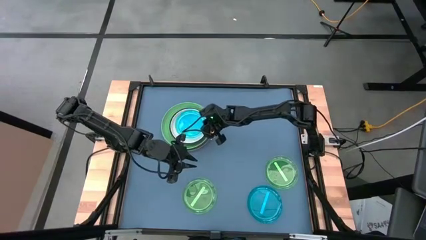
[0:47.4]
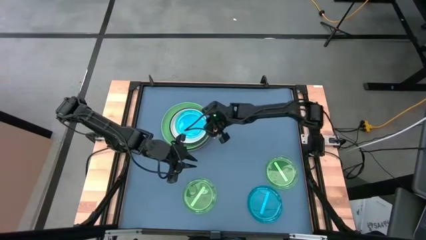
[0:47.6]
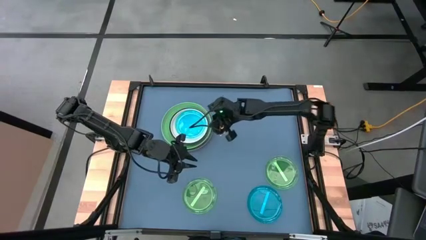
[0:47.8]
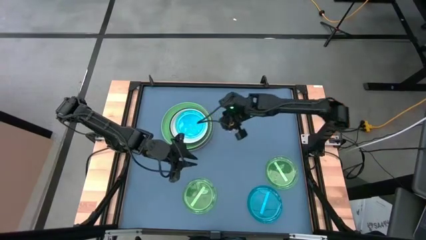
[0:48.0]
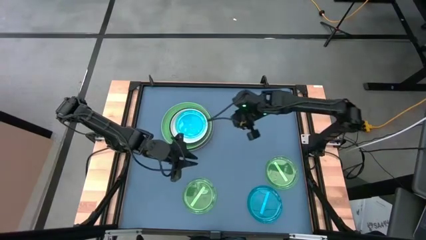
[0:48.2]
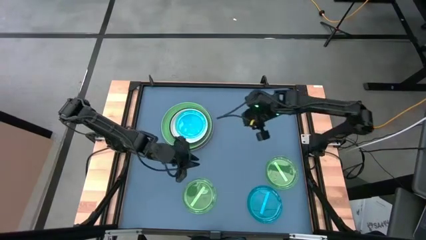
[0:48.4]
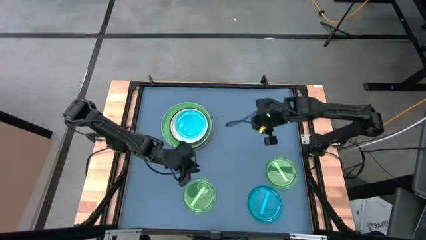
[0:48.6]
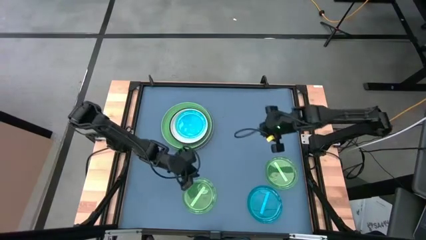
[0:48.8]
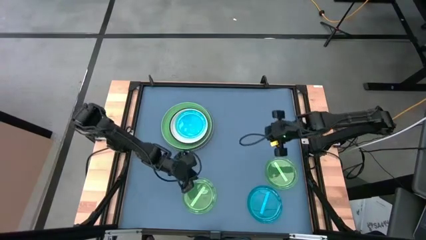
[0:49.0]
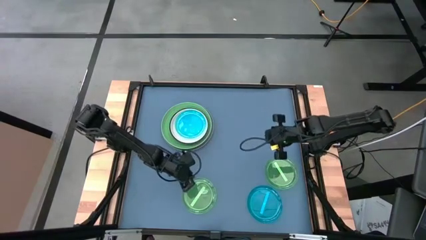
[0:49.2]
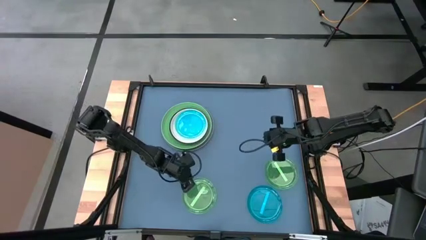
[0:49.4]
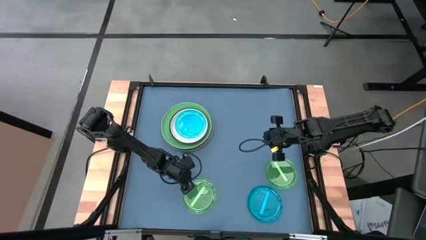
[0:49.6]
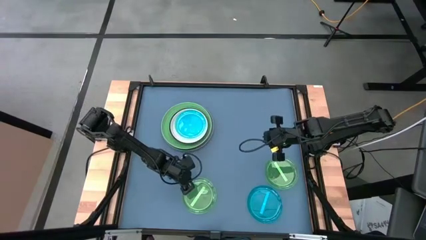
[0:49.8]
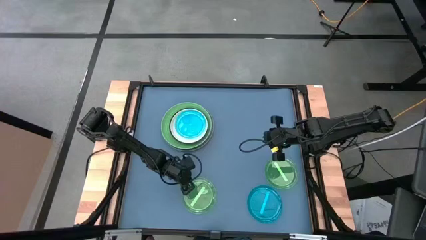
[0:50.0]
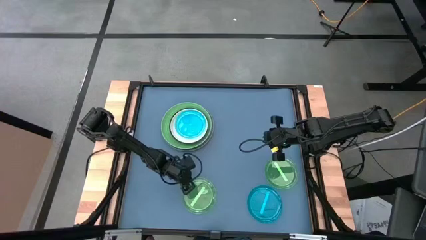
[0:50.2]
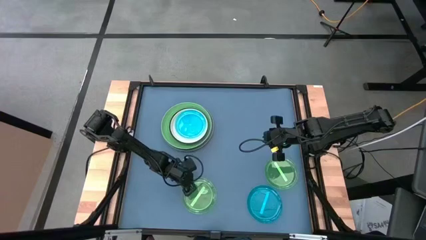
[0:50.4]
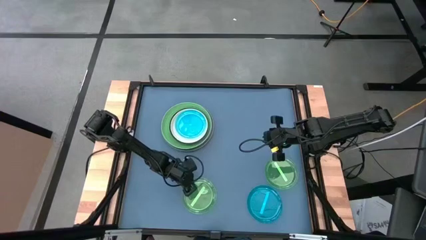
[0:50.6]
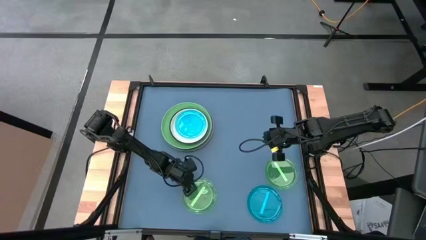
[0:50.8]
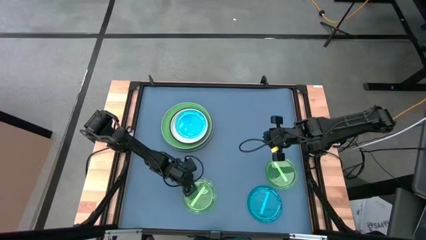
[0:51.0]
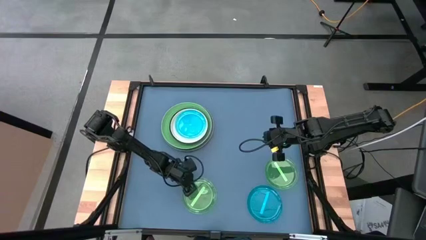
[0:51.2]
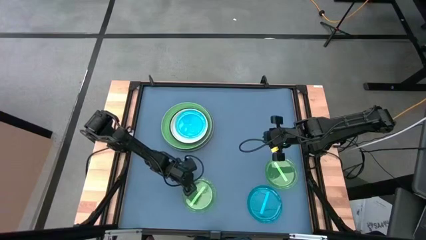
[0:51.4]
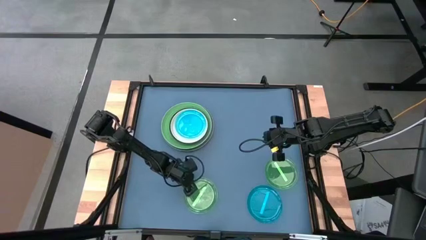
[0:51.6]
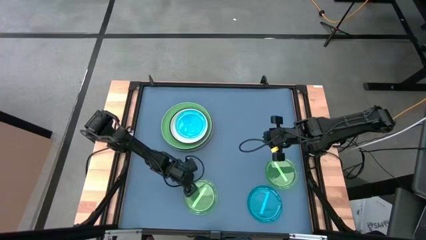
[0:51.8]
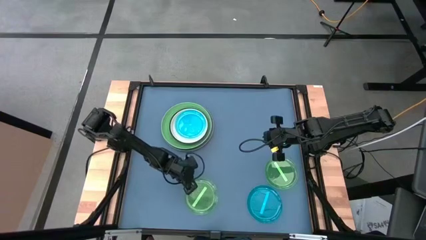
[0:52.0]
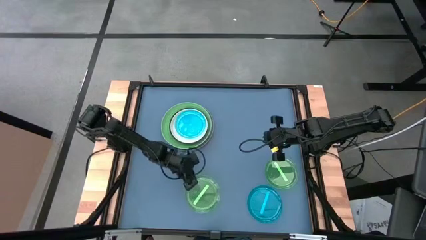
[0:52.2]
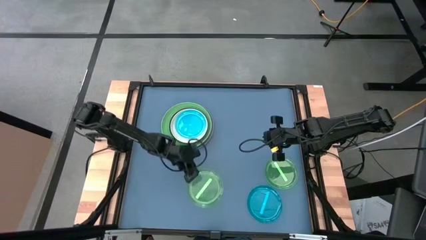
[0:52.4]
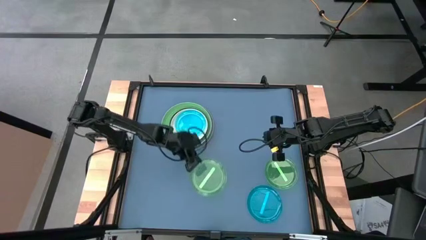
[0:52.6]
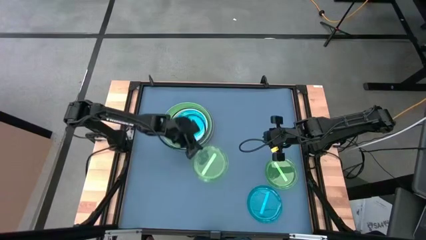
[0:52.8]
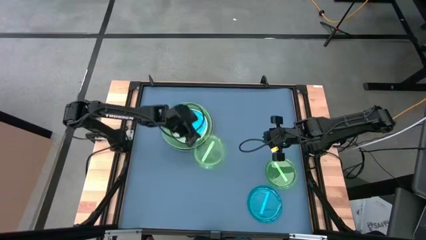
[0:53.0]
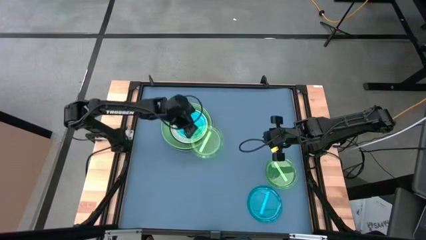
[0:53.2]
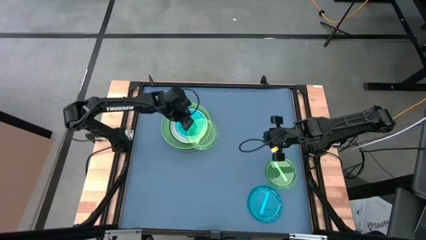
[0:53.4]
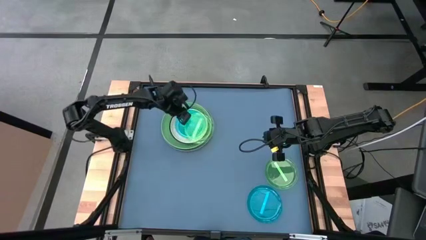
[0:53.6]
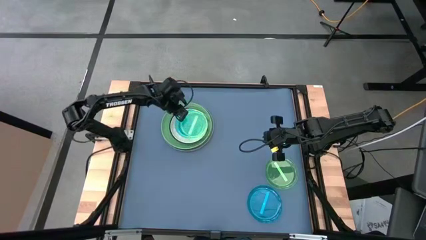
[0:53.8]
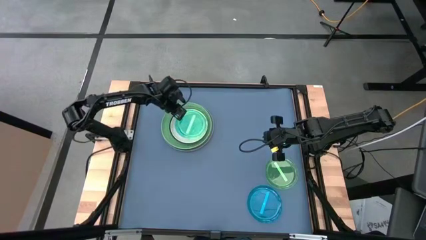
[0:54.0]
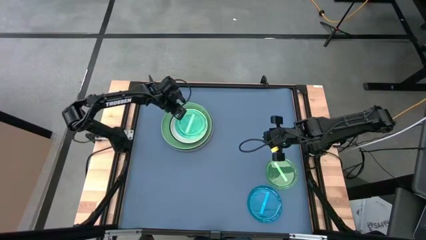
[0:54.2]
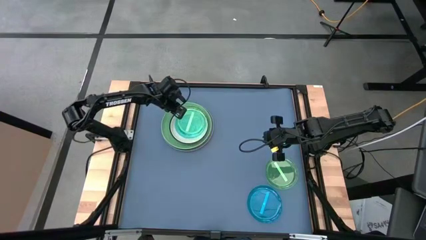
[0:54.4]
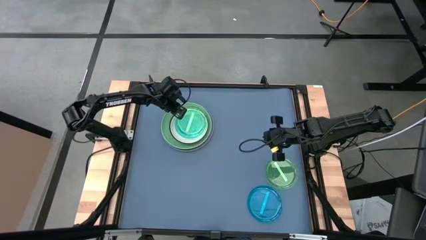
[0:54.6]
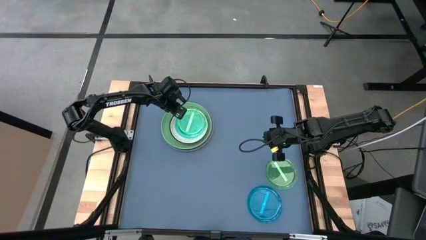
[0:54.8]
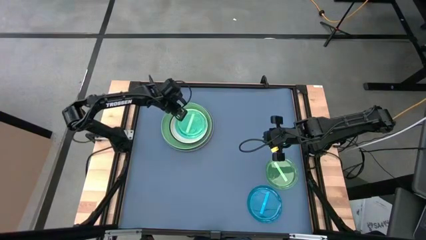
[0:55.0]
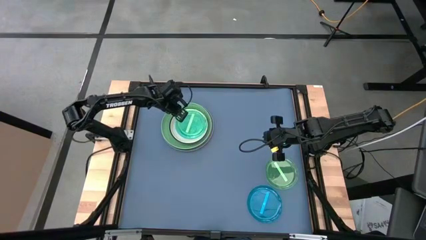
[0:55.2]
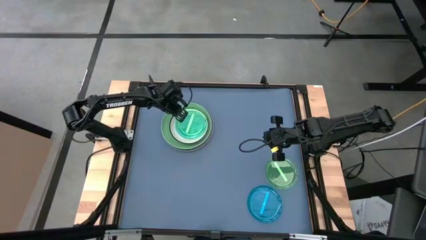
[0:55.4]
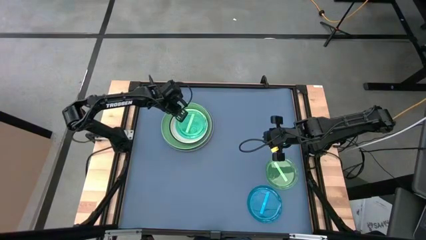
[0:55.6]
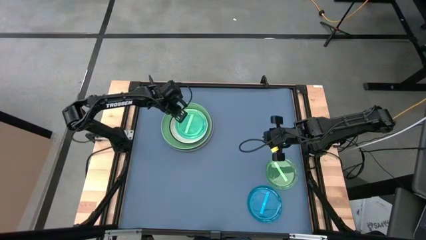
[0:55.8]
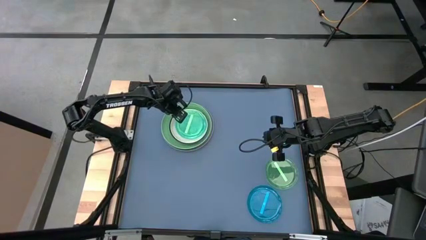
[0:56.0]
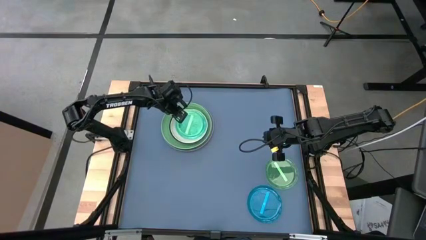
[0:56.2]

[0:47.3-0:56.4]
Task: Stack plastic plates
Stack the left light green plate on top of the blue plate

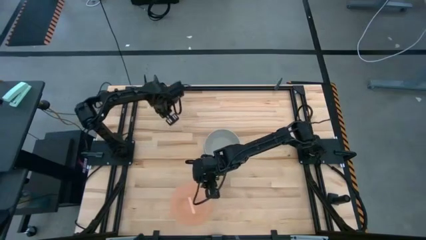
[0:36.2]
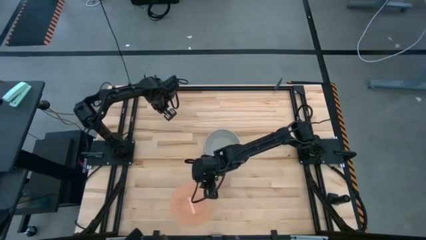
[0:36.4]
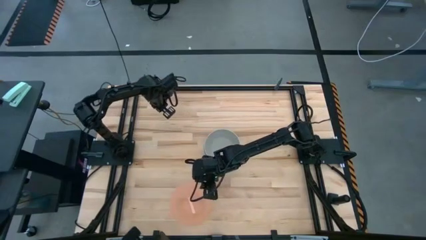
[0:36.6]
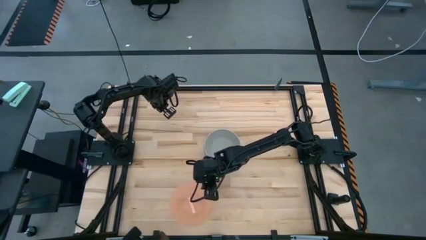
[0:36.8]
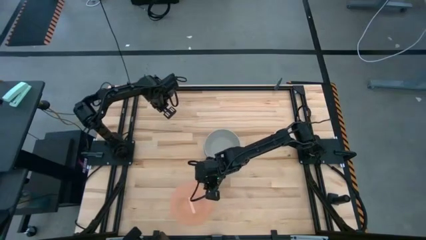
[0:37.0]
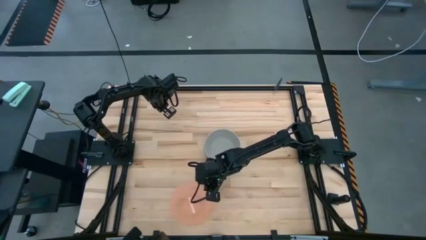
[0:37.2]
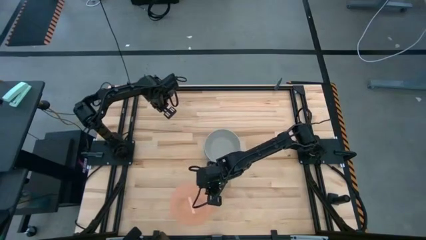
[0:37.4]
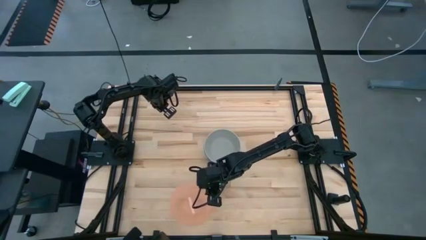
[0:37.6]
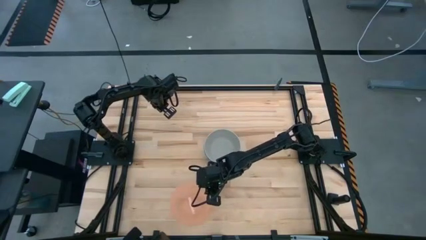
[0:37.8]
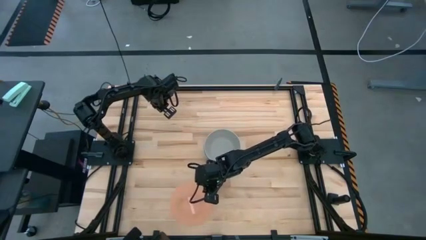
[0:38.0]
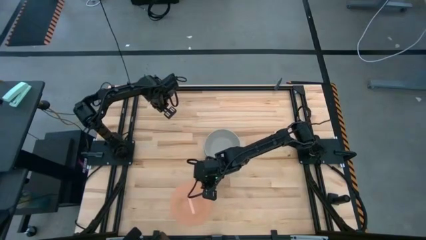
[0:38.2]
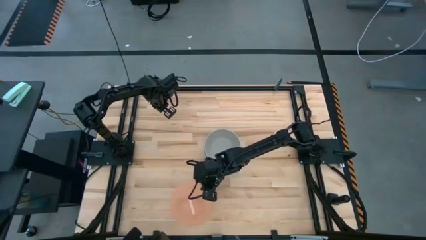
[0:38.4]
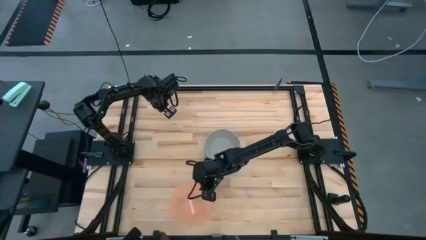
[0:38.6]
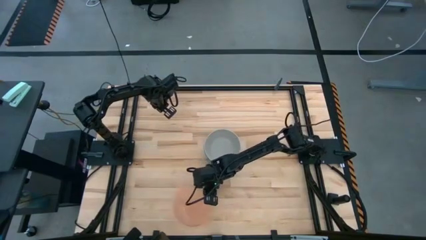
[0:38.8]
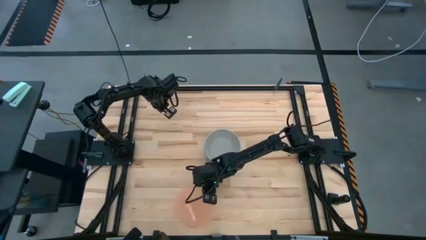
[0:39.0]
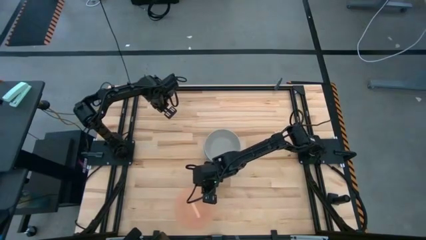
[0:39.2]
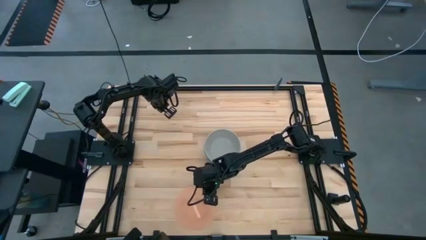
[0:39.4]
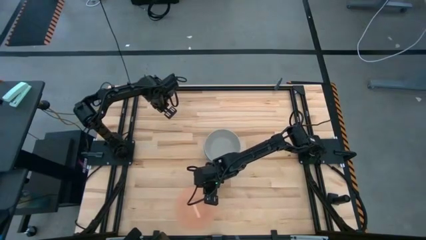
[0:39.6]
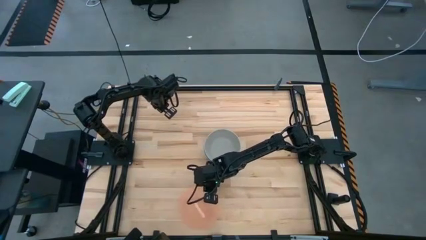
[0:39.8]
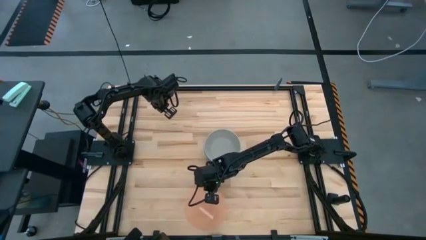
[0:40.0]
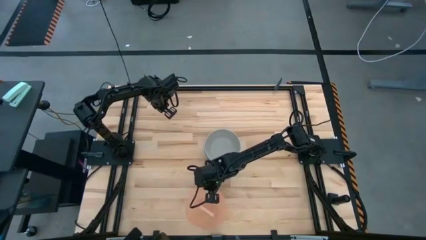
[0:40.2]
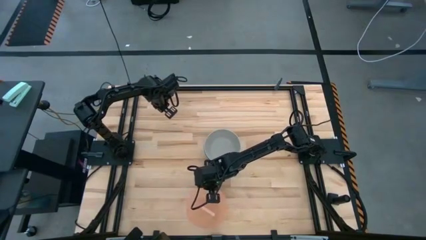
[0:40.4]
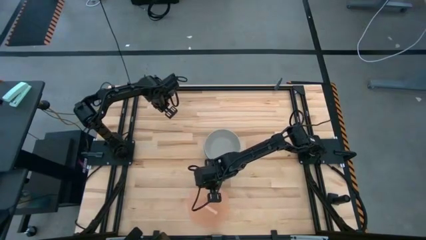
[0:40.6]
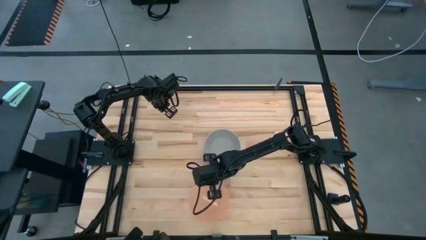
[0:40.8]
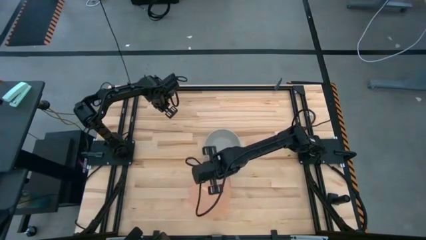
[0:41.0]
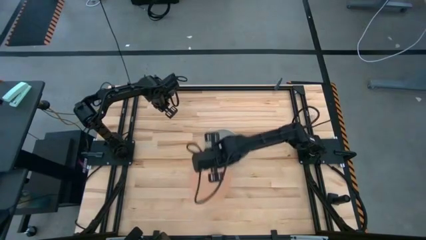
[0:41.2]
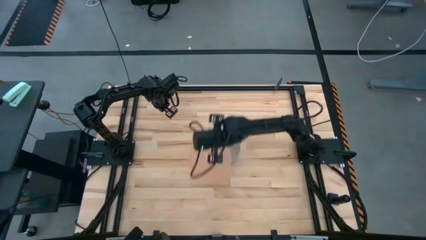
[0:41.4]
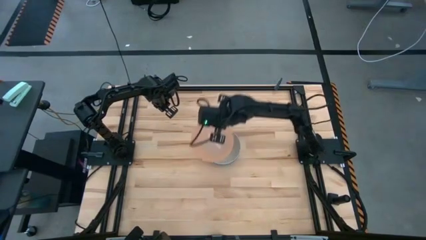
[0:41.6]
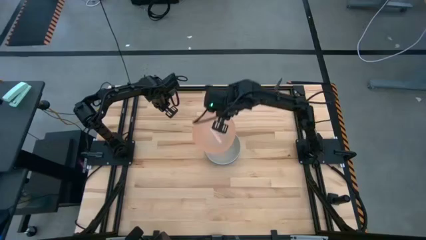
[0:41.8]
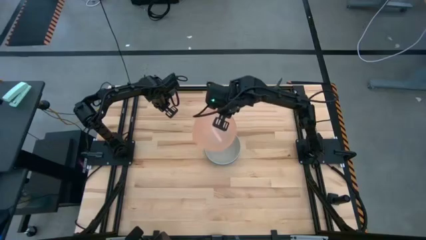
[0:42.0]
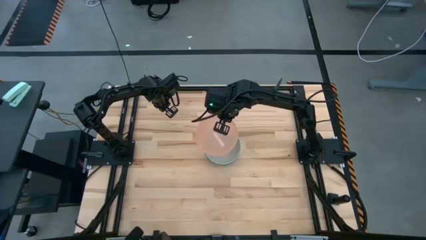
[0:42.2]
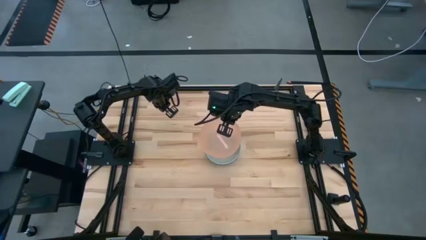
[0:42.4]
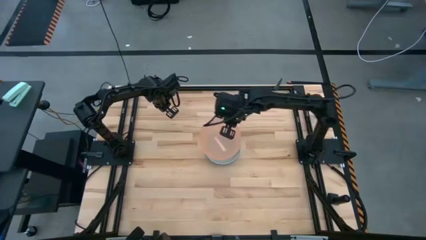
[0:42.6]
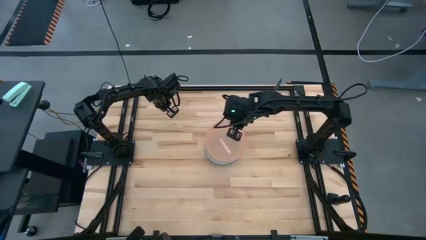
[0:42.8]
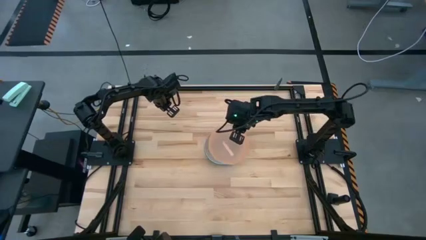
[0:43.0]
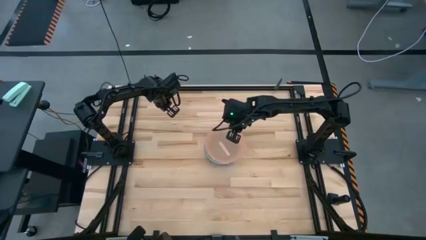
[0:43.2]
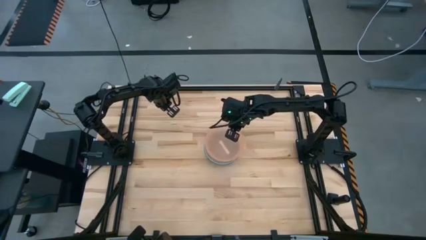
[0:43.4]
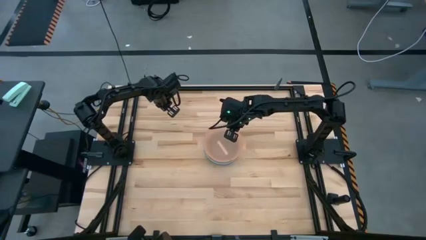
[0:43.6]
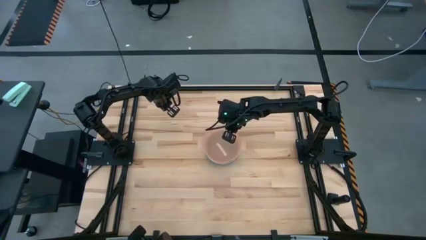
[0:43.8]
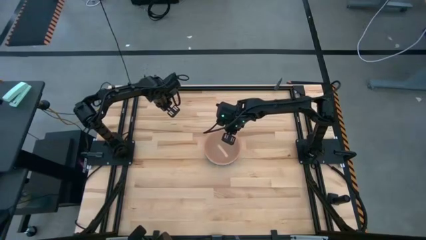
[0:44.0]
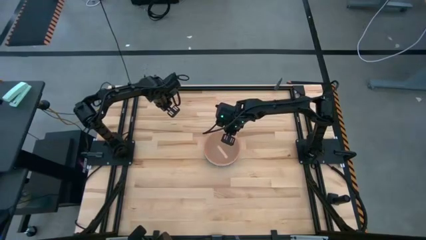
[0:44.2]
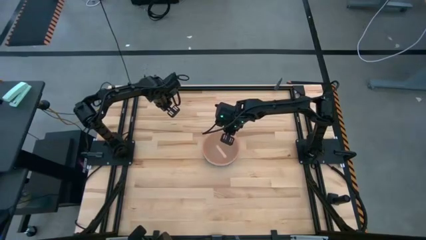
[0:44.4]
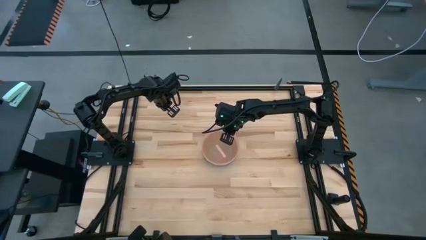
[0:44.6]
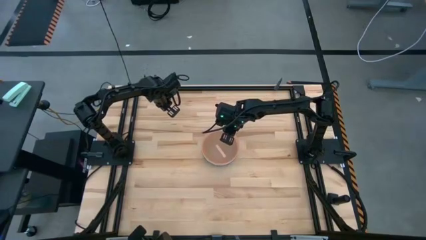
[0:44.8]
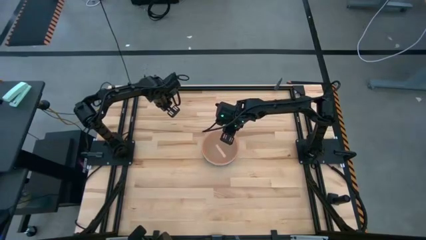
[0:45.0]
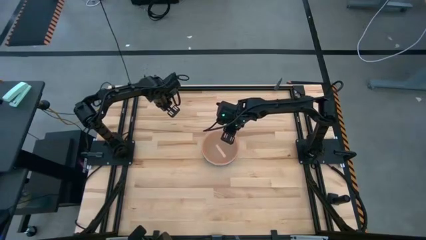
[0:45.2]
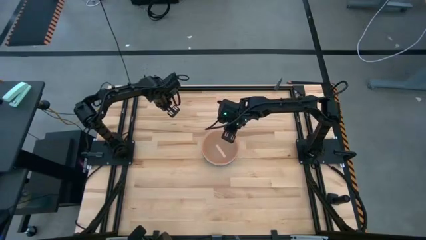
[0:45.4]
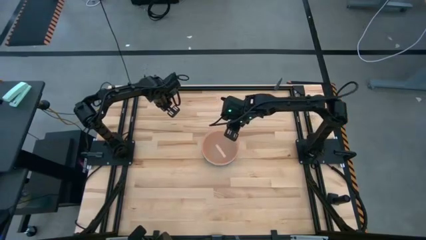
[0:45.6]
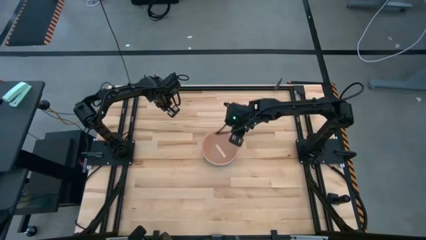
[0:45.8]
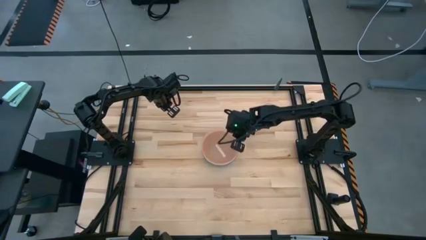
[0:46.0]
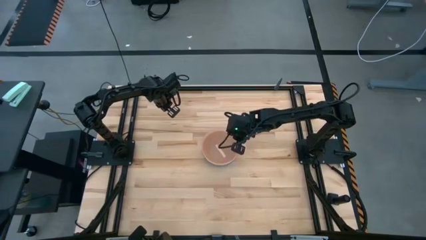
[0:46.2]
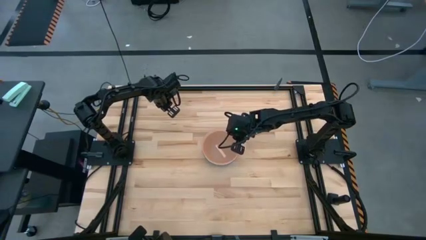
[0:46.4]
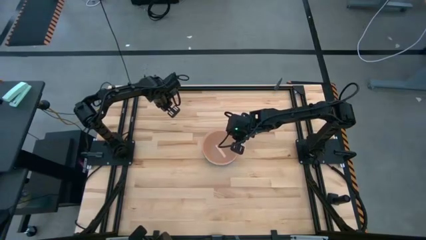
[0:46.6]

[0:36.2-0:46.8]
Task: Nest bowls inside each other
Stack the orange bowl on top of the gray bowl
